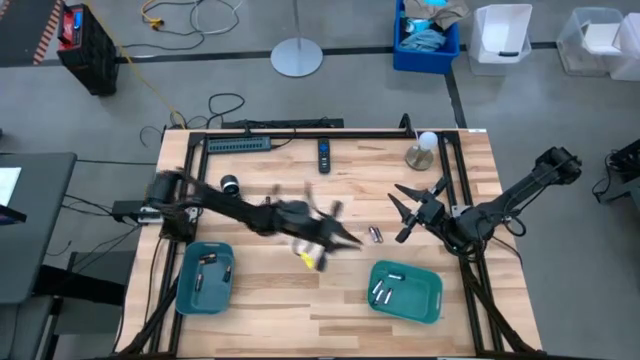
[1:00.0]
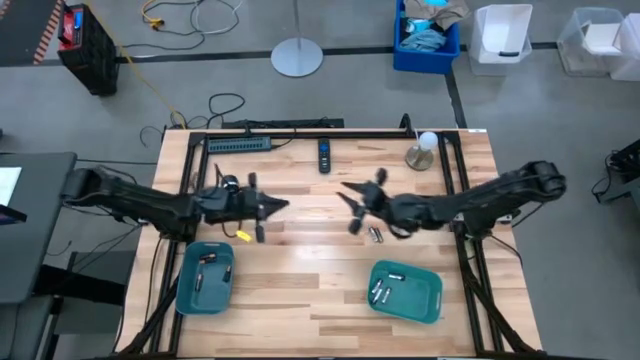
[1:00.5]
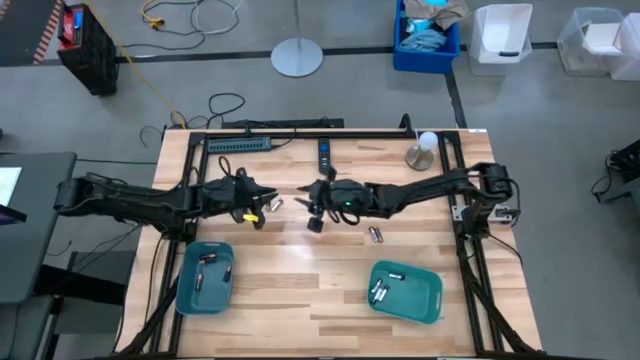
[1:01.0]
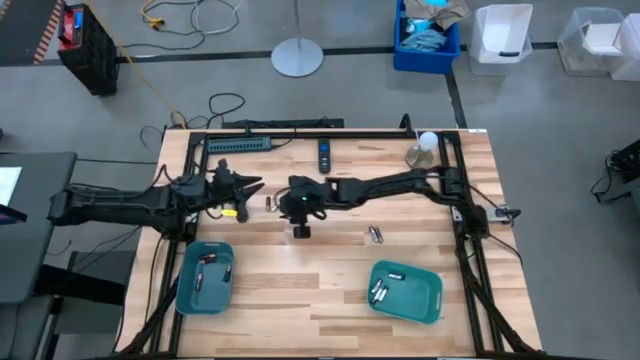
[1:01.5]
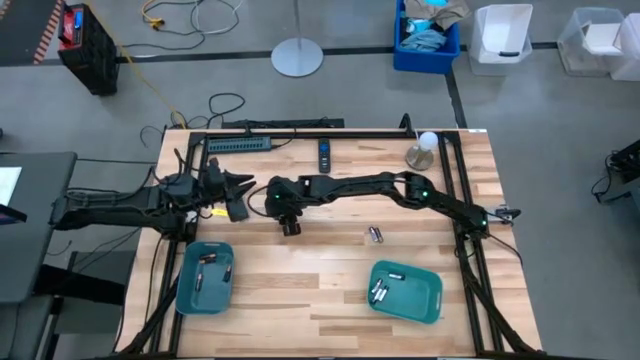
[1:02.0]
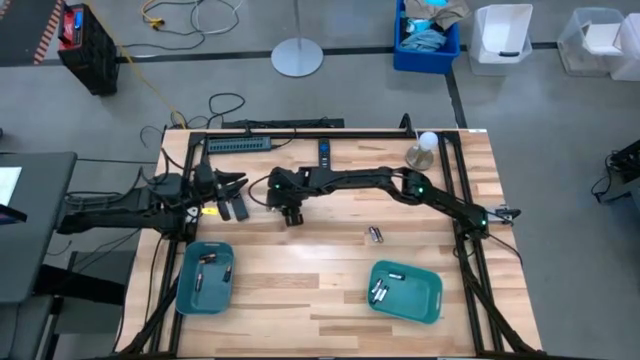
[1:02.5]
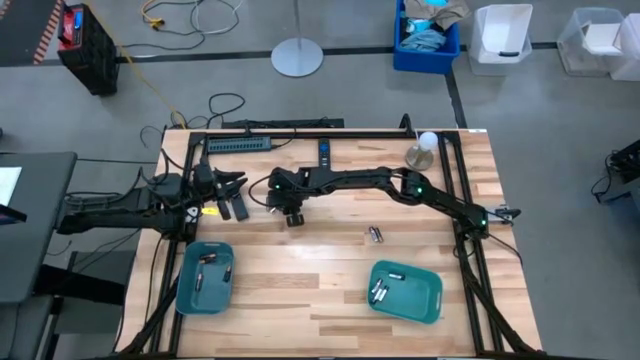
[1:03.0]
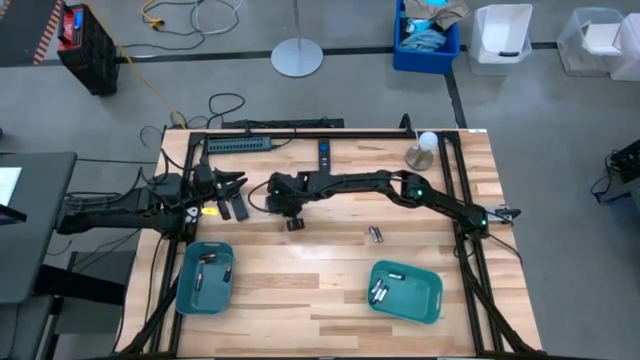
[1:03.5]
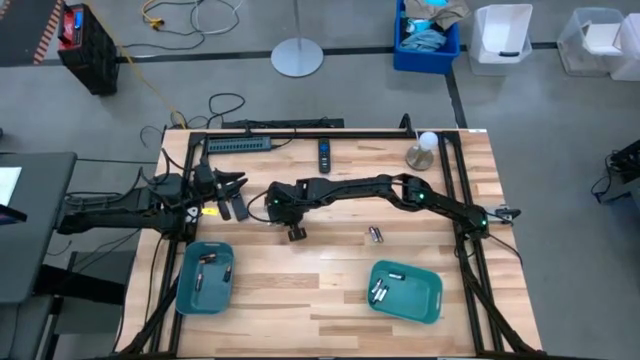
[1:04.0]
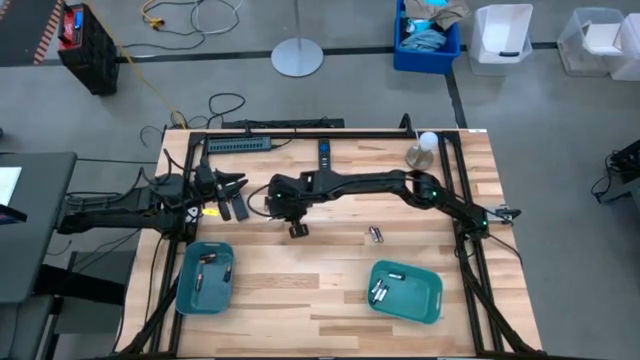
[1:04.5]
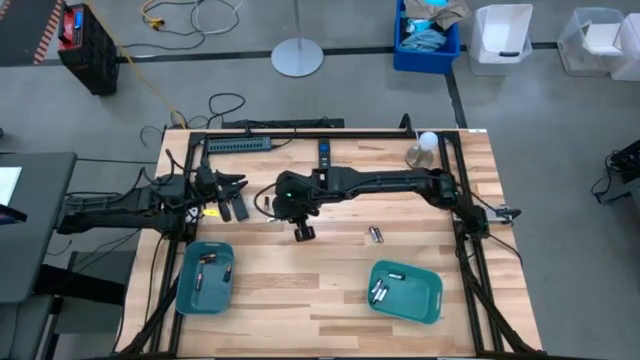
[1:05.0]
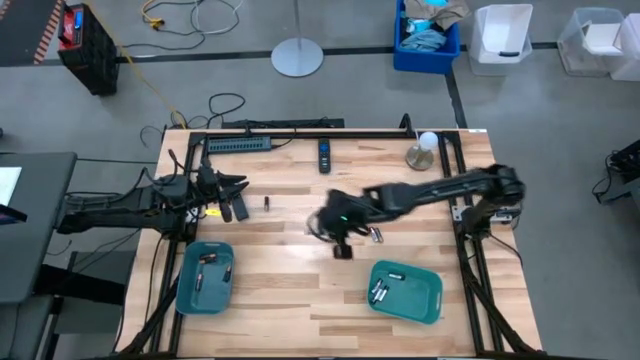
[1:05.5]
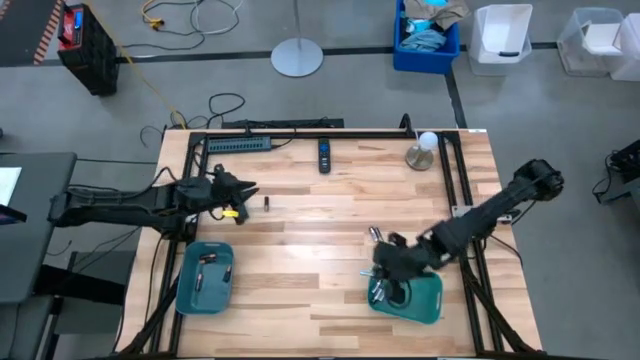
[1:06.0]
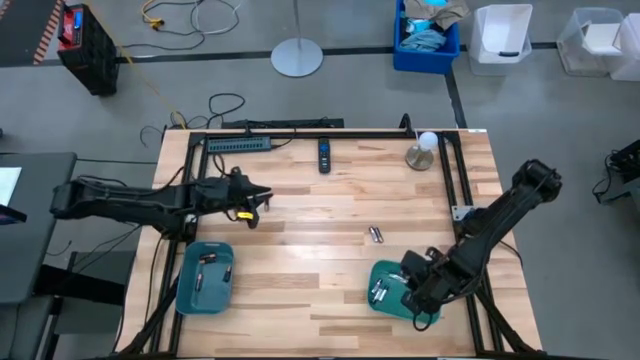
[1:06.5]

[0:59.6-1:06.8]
Task: Sort batteries
Put the silver battery into the green bin

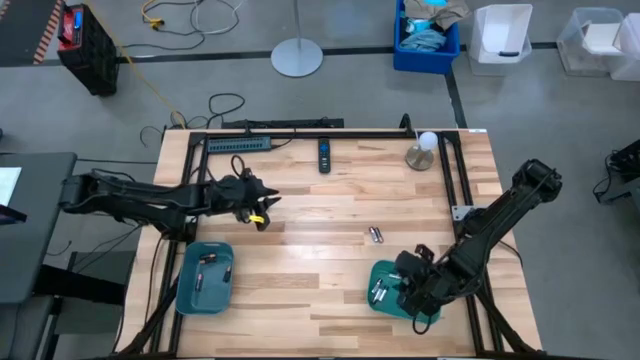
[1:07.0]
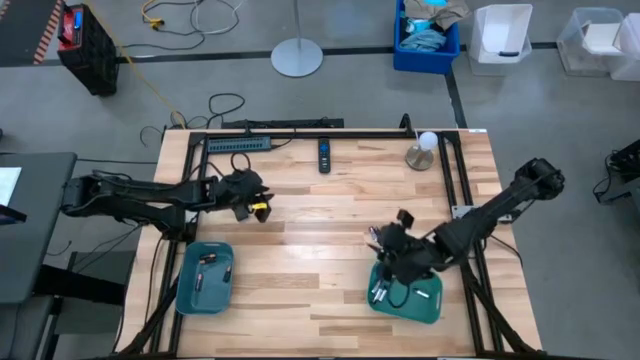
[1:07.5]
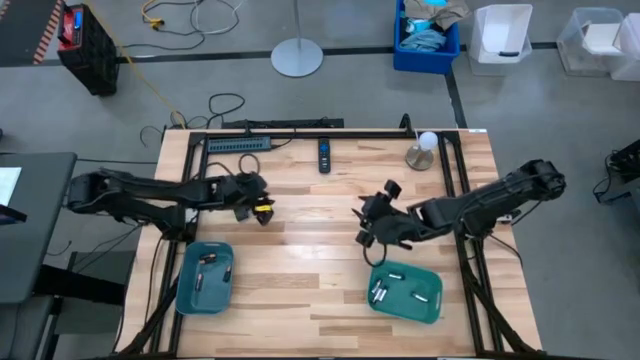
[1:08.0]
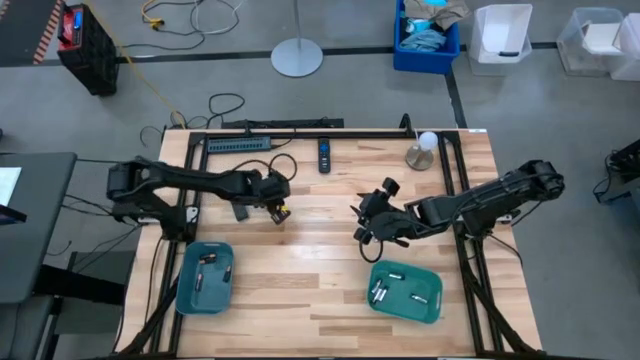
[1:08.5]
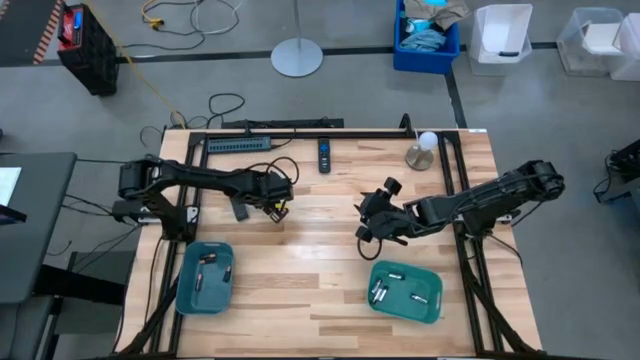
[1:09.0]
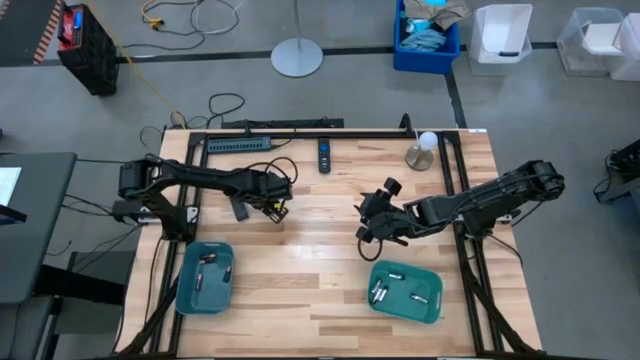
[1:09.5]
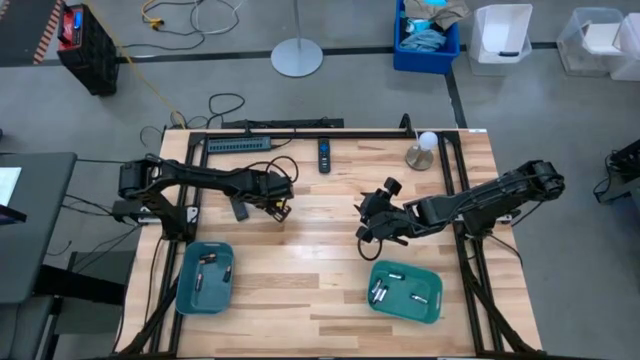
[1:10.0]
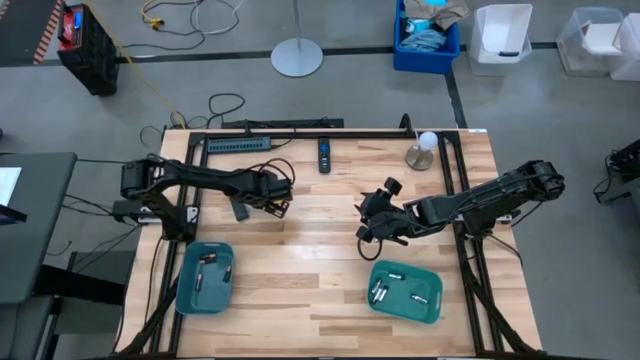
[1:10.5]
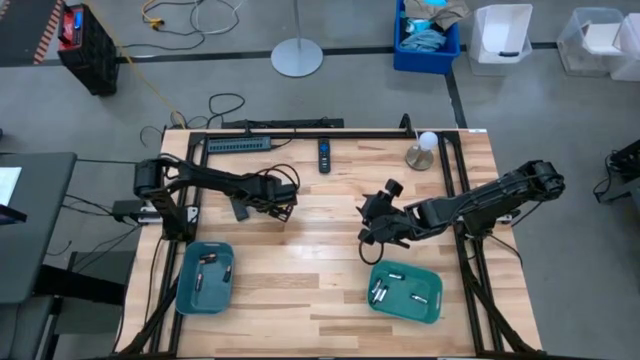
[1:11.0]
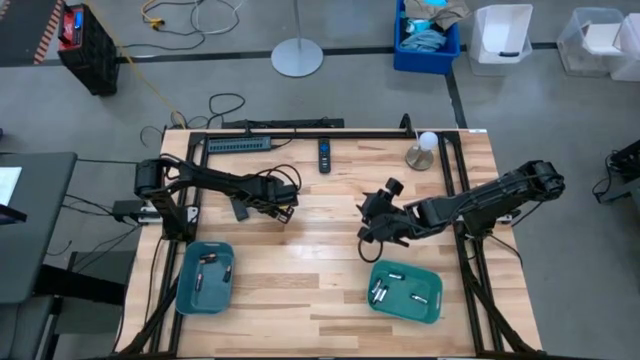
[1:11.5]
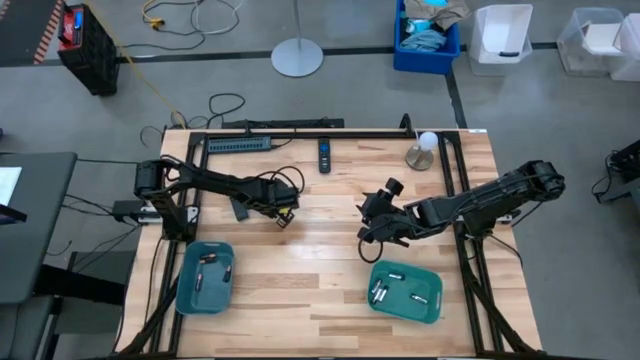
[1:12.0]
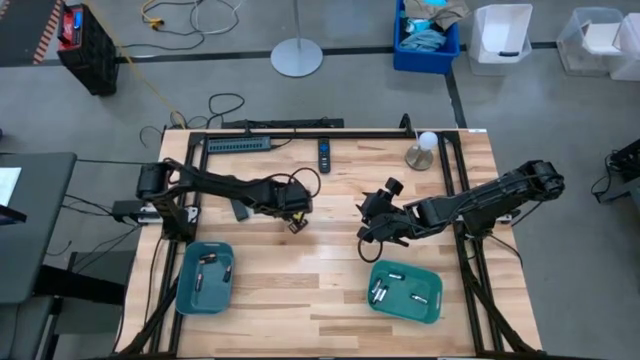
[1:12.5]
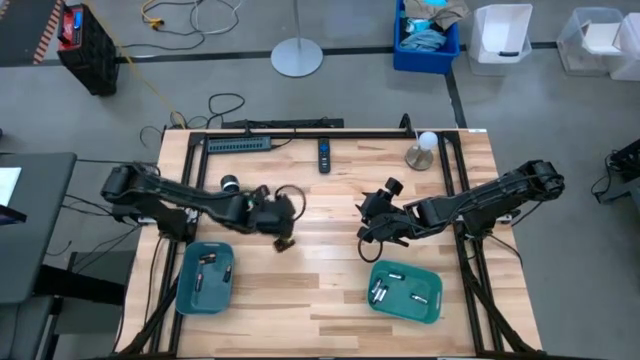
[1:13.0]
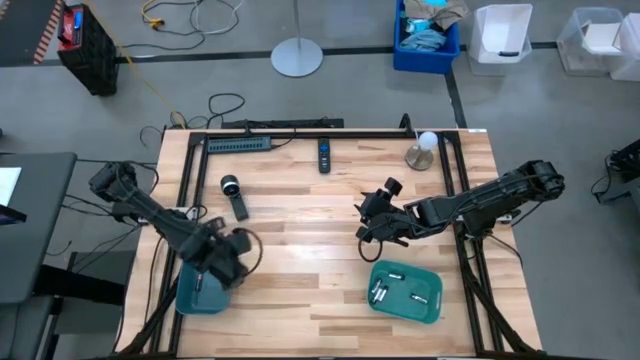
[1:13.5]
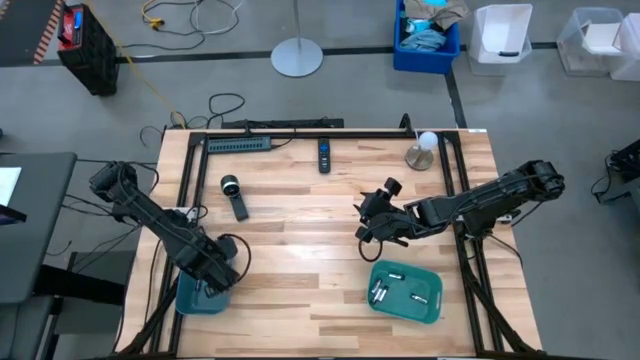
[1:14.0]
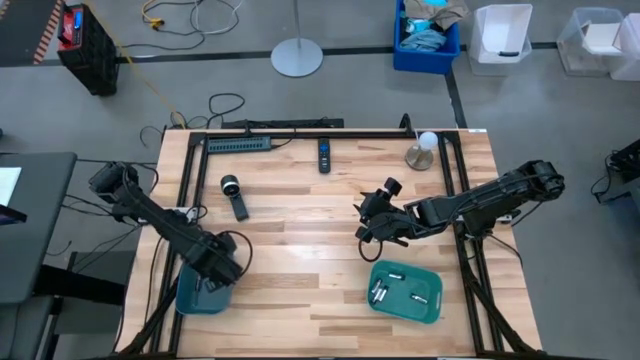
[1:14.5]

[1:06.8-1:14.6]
Put the black battery into the blue bin

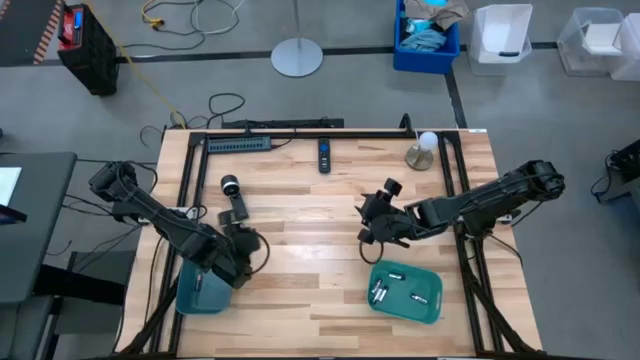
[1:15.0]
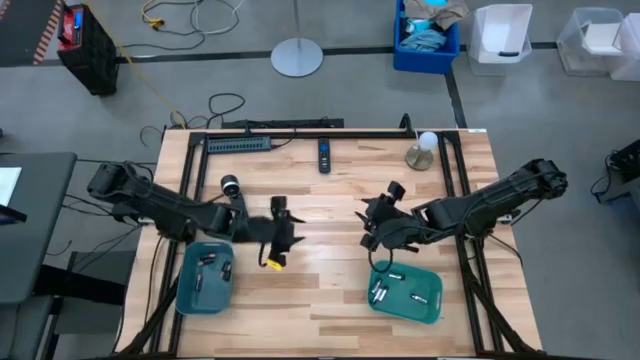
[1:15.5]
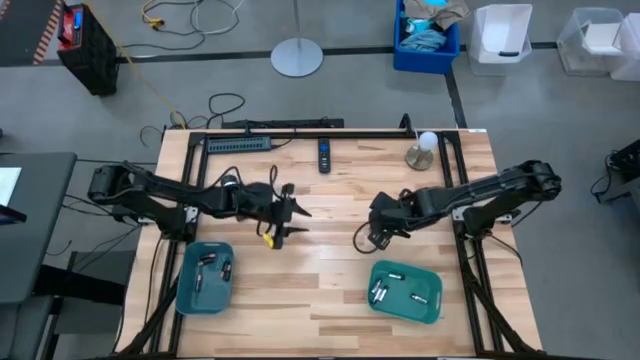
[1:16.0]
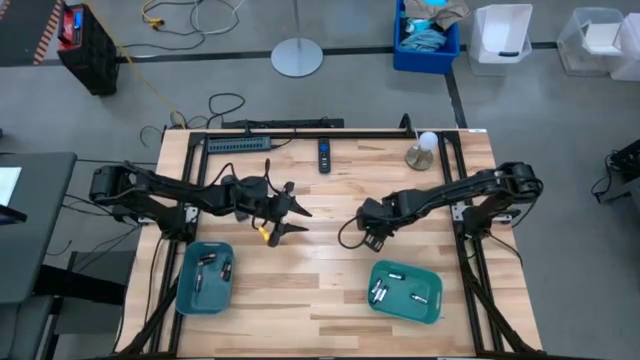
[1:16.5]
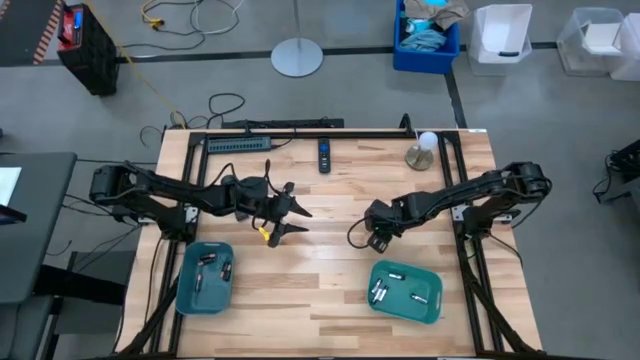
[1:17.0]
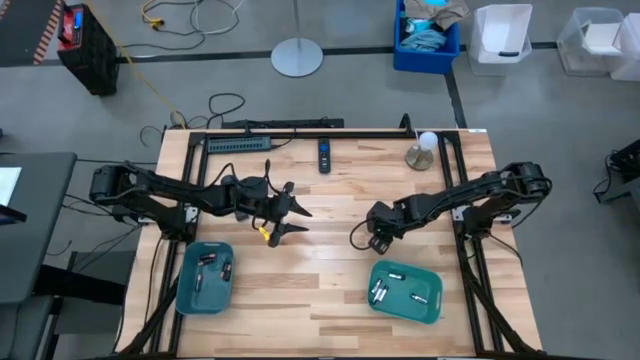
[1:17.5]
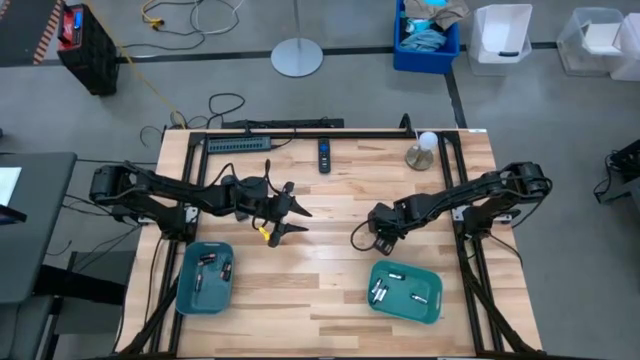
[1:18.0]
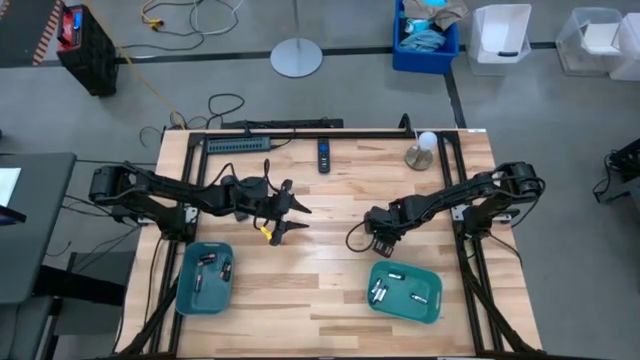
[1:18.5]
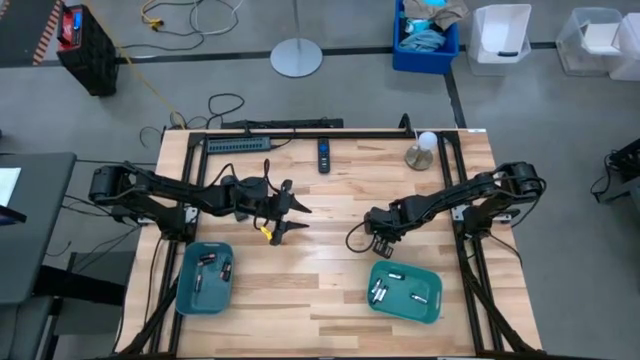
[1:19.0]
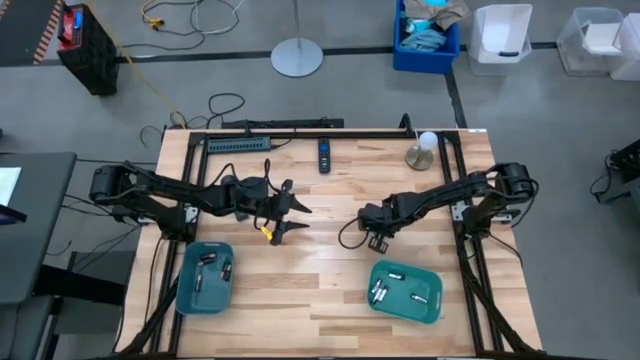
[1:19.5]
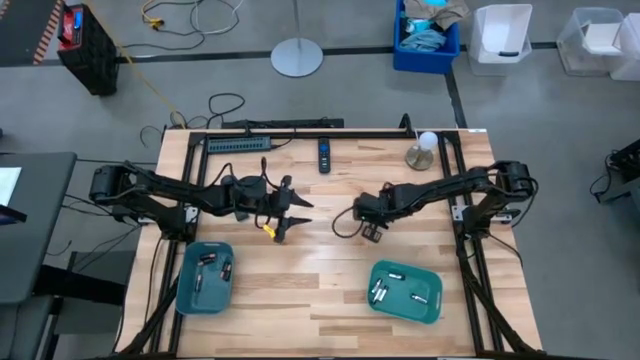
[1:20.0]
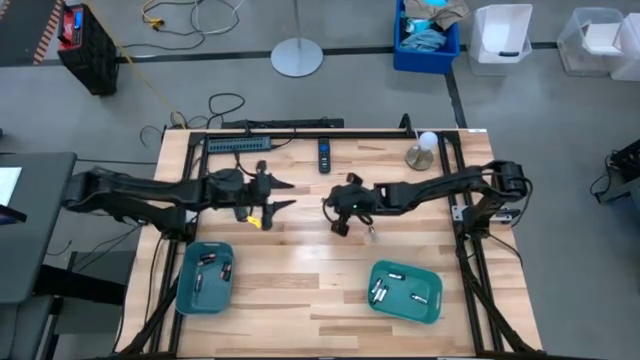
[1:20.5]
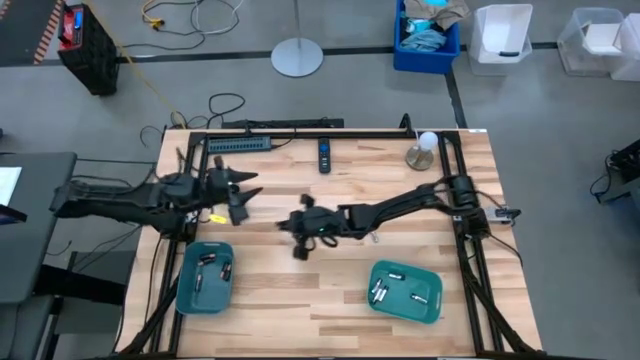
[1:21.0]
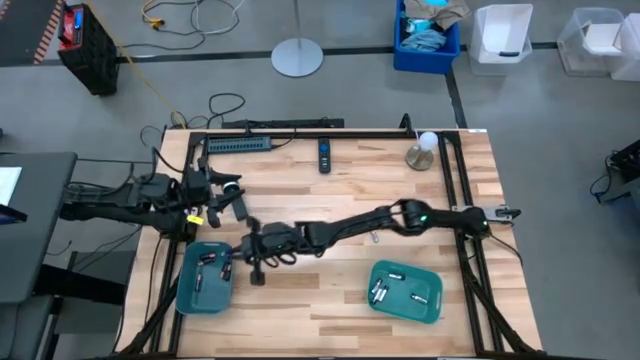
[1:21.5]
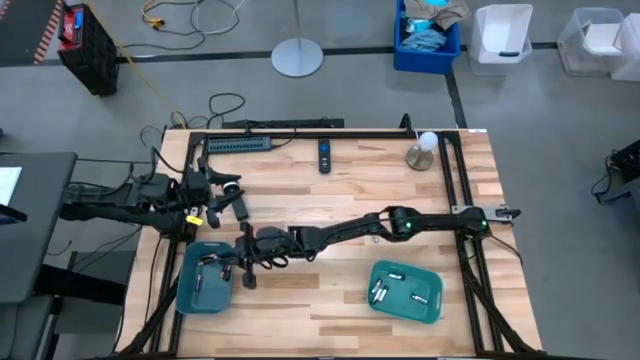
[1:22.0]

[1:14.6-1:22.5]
Put the black battery into the blue bin
